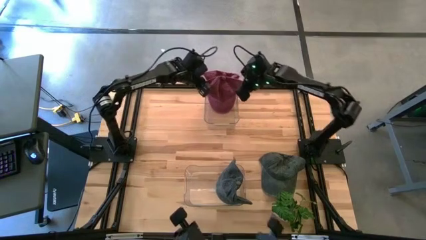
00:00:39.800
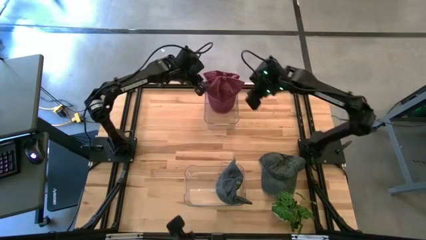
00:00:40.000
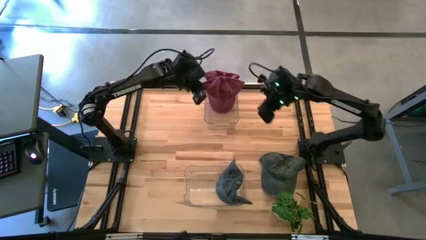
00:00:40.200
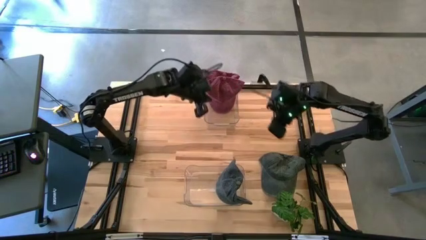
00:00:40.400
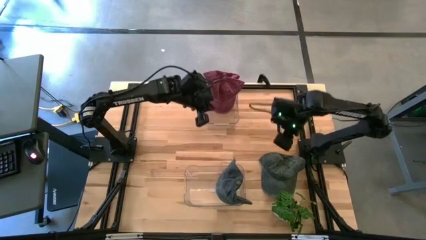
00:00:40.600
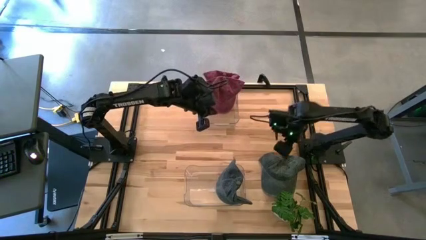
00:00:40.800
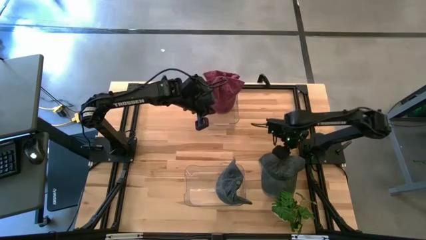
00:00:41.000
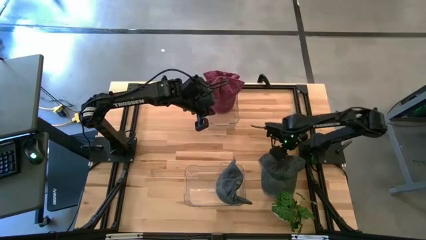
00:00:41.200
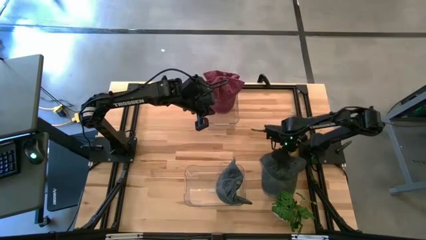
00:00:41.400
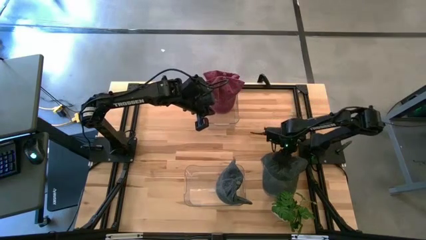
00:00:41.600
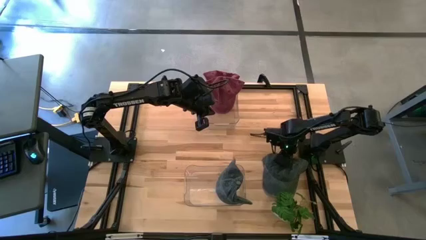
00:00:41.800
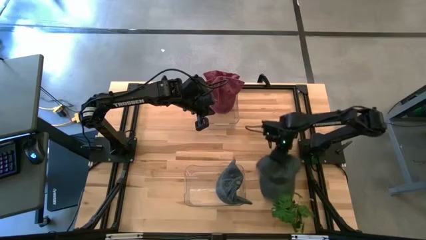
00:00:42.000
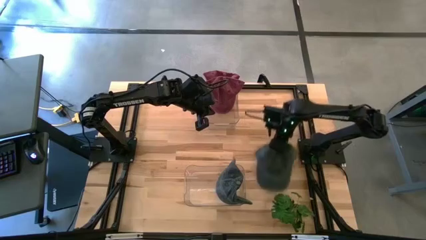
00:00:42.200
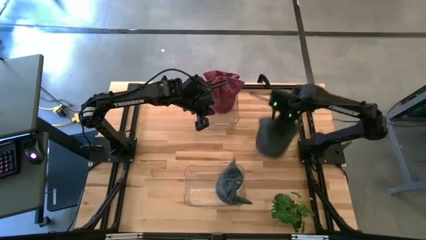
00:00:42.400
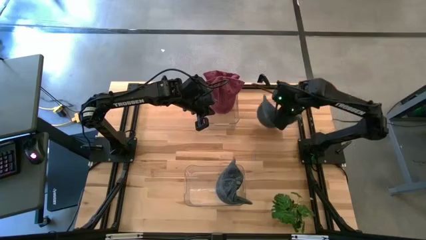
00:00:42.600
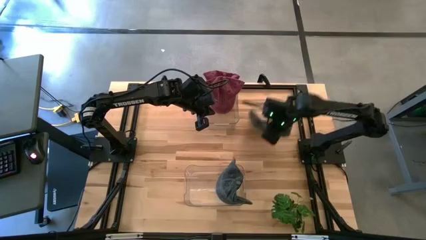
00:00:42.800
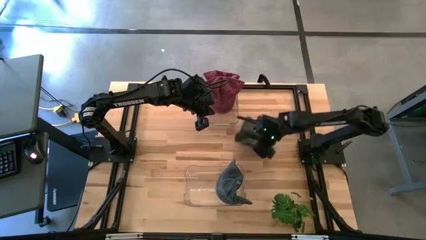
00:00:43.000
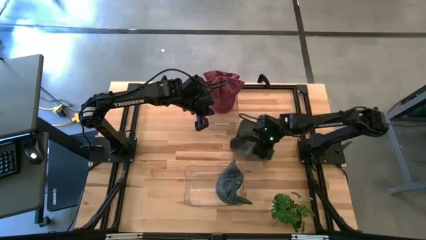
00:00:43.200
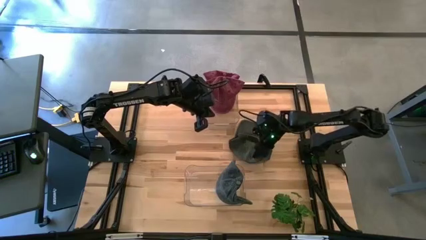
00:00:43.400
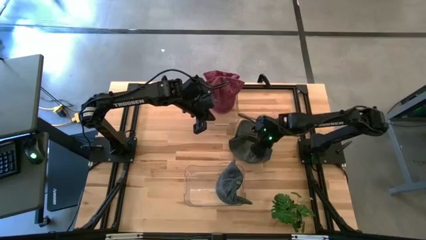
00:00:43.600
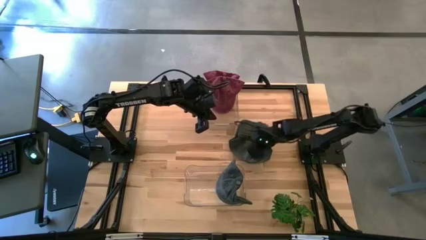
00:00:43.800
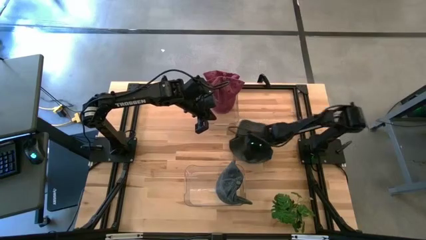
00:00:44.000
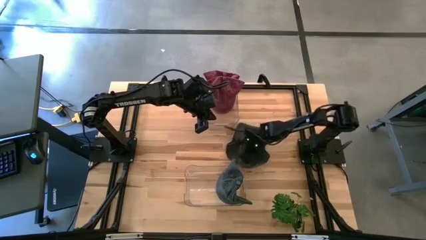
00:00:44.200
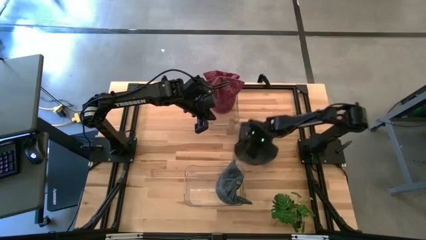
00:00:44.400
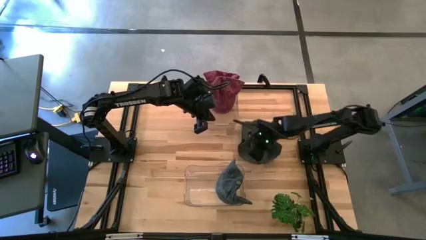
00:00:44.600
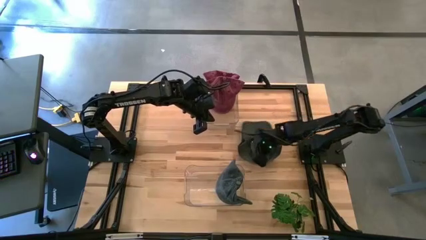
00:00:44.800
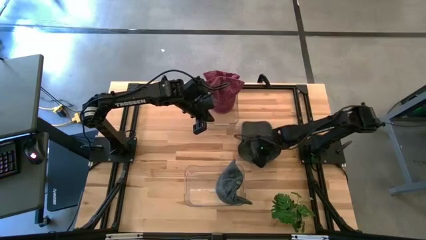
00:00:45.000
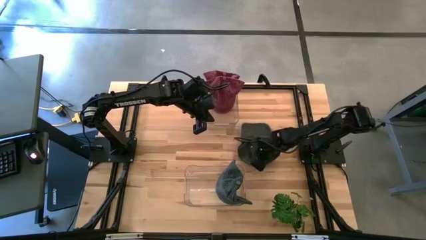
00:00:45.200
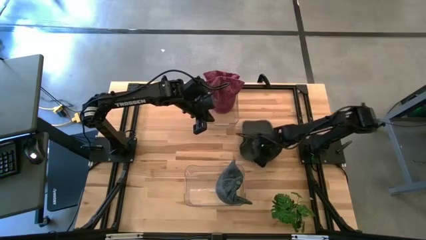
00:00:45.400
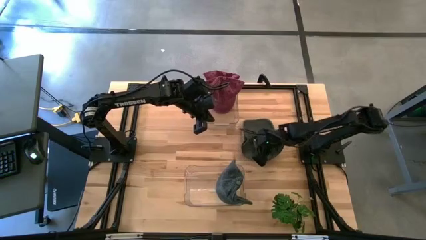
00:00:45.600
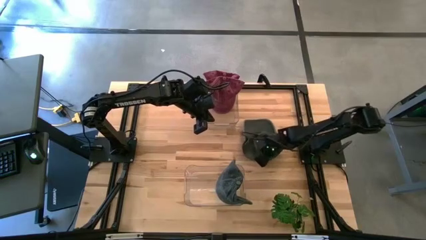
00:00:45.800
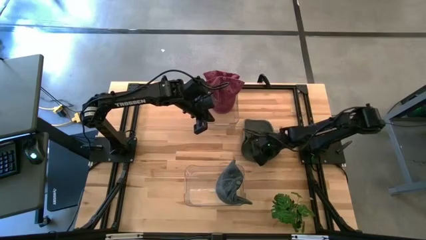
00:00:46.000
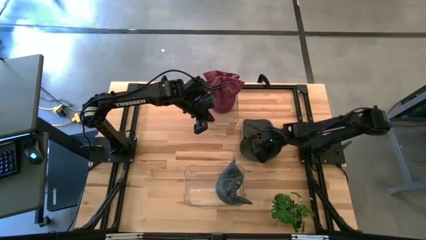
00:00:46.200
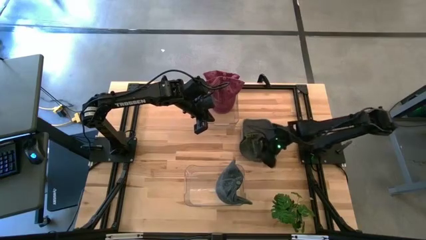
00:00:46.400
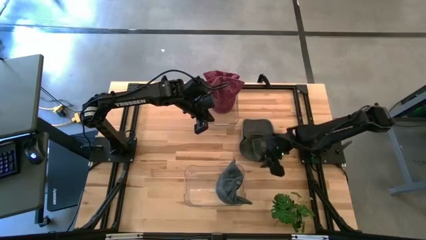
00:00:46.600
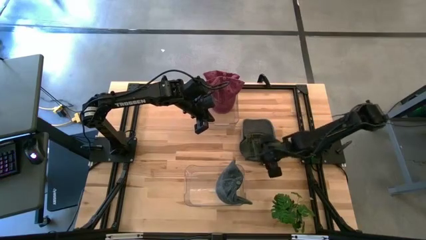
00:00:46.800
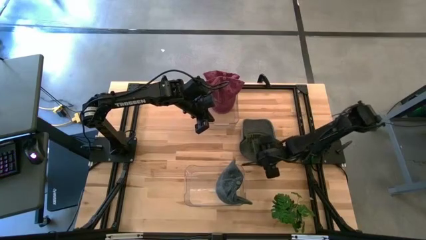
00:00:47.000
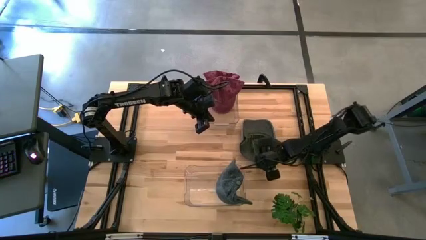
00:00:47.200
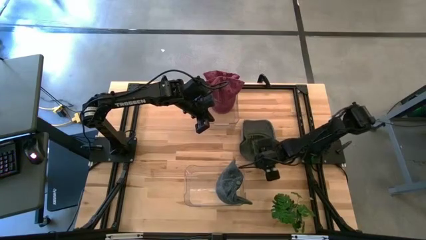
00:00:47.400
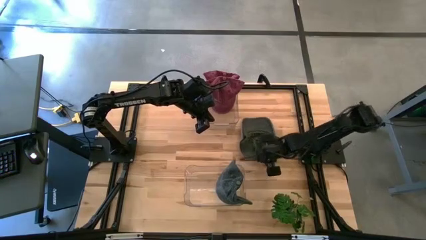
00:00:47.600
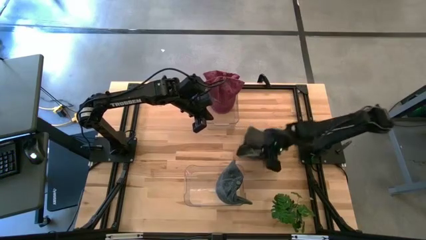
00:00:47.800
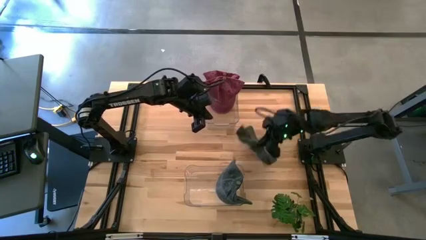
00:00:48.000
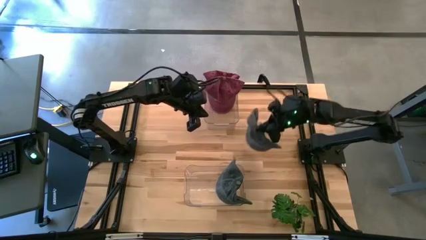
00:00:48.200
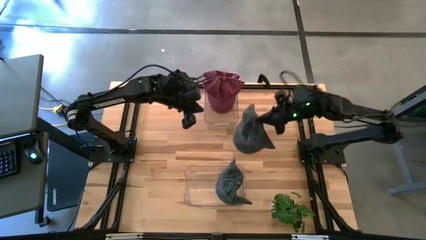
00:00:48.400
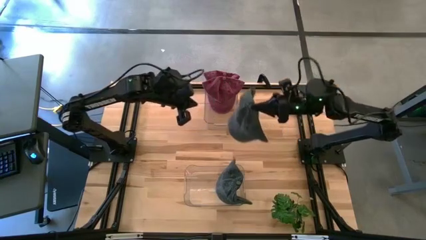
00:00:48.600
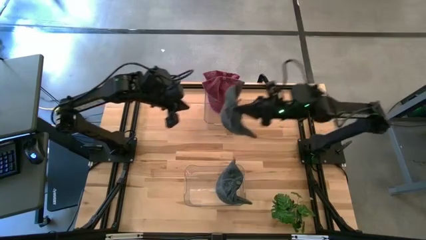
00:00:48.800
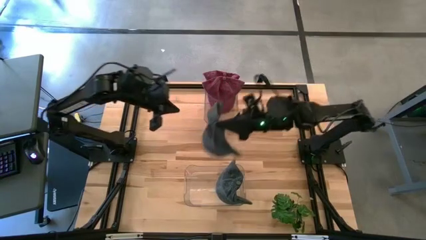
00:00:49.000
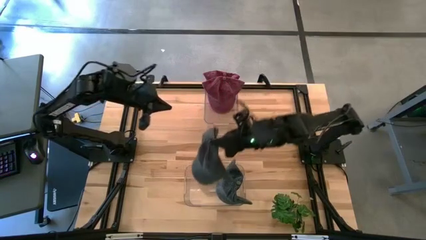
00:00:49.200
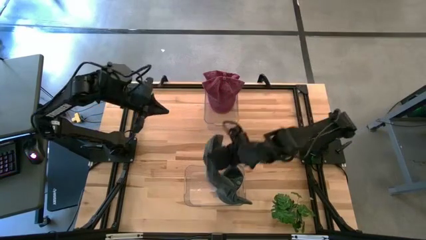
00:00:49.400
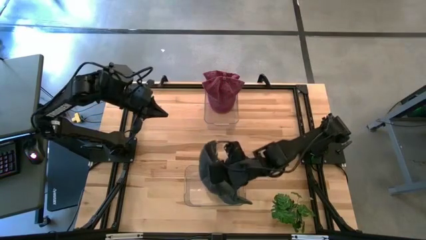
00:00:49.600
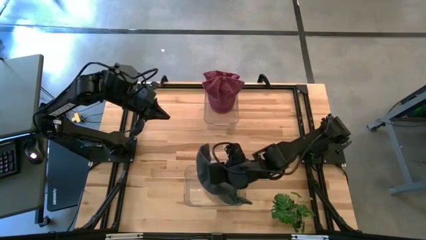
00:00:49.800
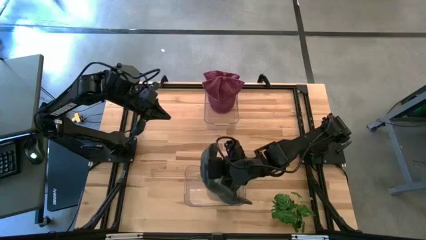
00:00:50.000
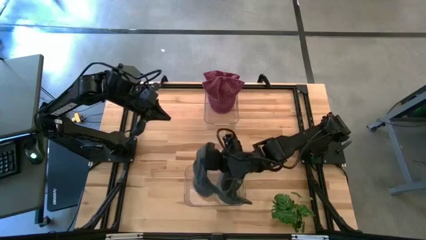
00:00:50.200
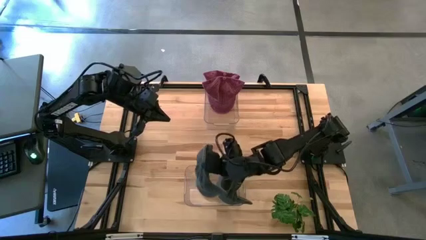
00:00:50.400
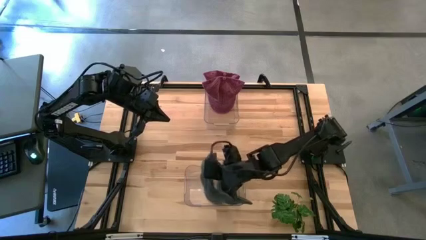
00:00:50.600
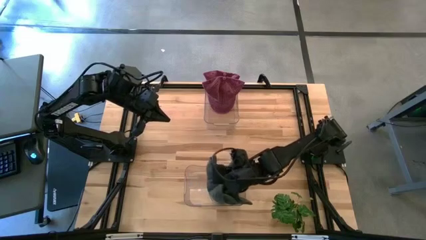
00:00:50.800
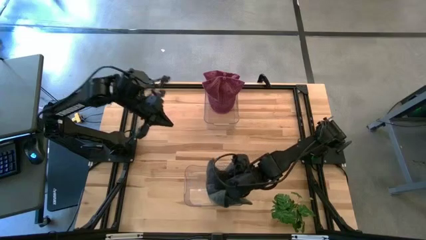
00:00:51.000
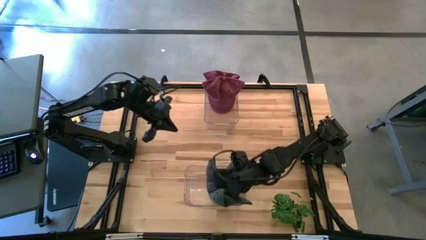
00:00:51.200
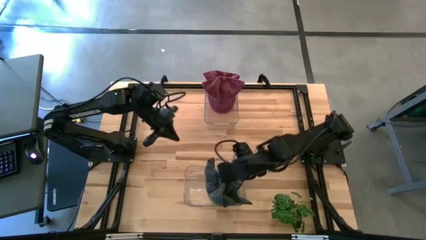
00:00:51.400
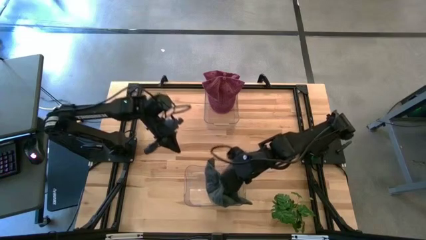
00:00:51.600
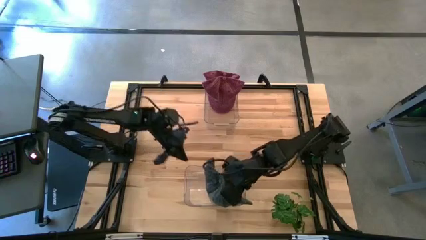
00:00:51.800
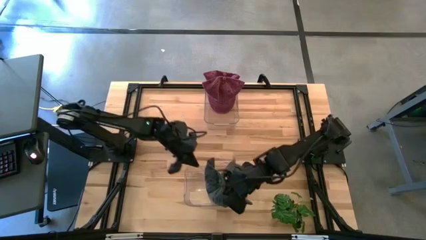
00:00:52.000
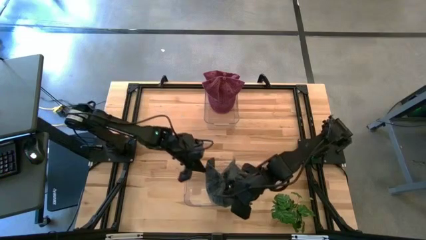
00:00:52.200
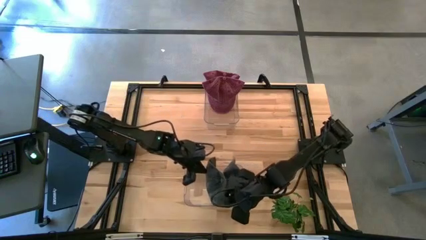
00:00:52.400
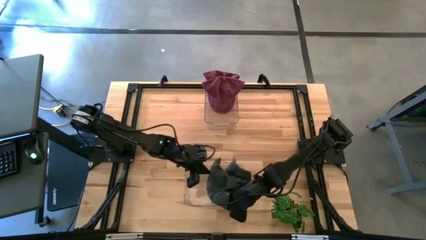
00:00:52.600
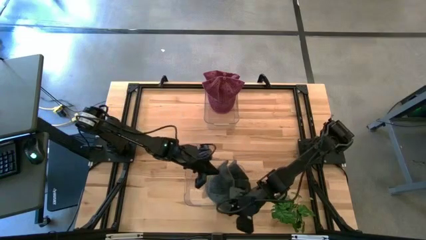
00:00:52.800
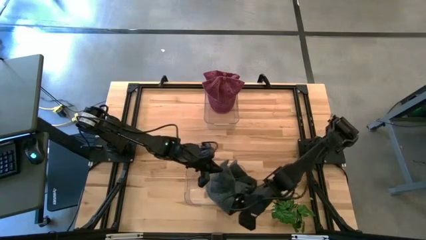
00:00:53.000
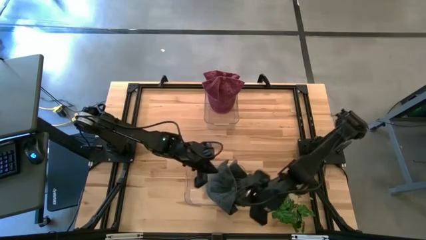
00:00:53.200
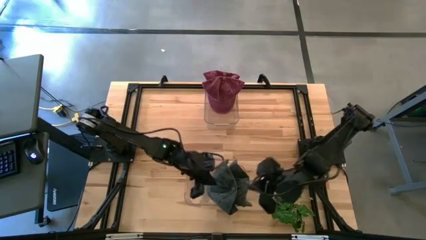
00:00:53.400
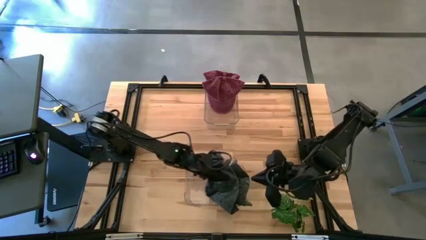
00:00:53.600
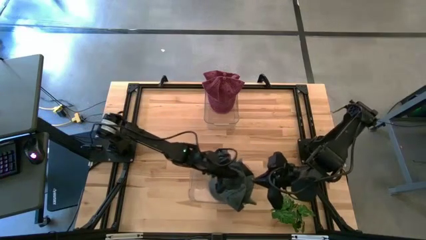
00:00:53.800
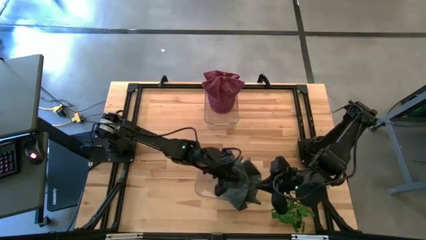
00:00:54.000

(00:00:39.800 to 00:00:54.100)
Task: Pick & Place hat
Put the black cap into the bottom transparent bin

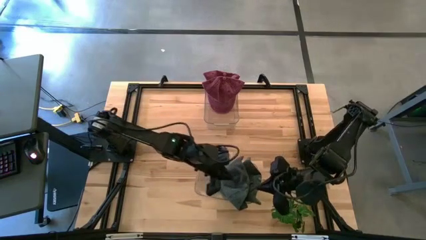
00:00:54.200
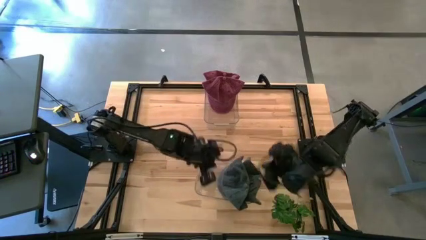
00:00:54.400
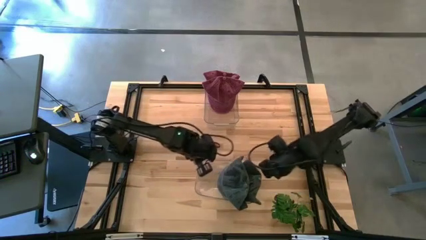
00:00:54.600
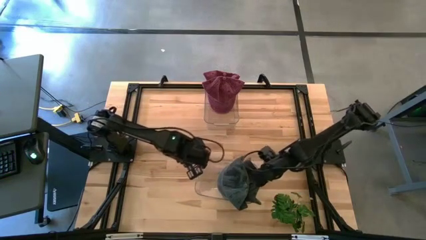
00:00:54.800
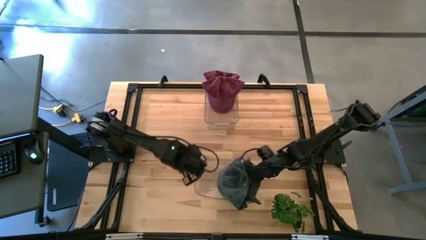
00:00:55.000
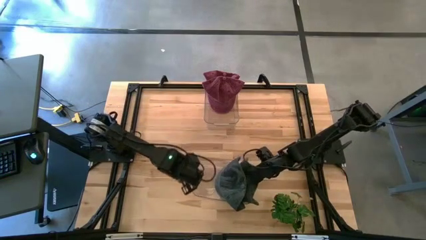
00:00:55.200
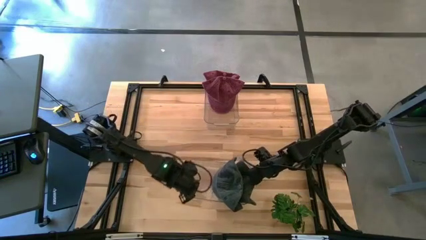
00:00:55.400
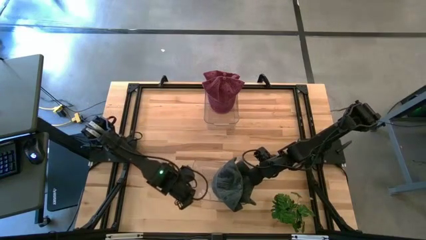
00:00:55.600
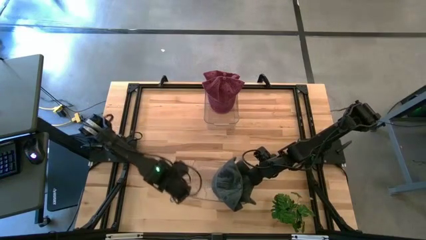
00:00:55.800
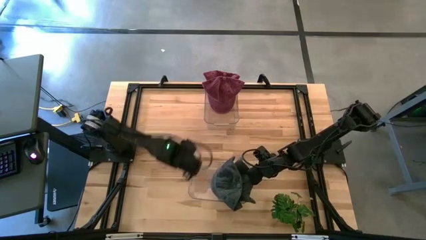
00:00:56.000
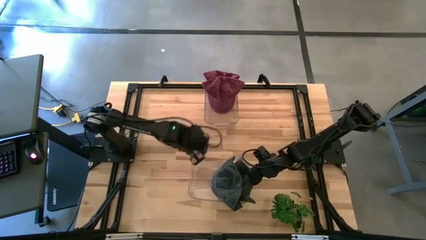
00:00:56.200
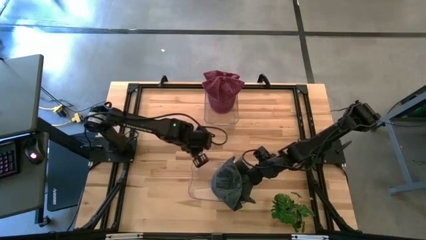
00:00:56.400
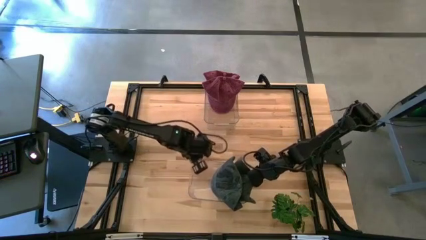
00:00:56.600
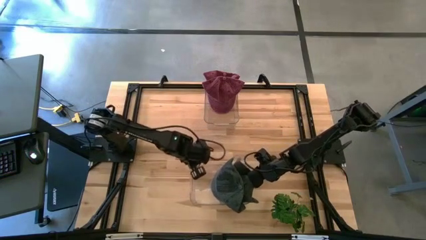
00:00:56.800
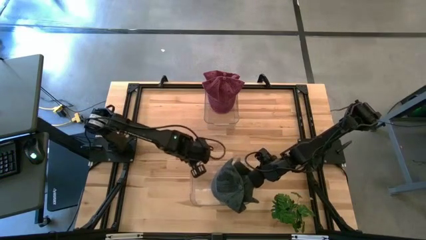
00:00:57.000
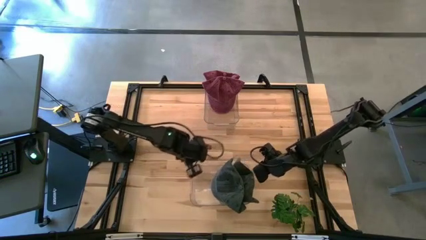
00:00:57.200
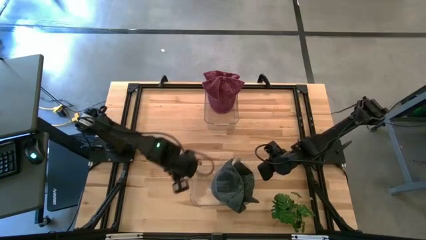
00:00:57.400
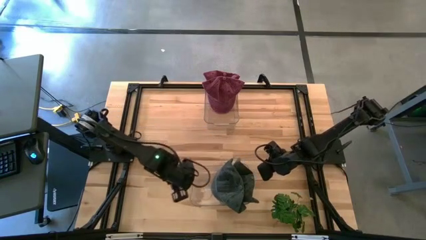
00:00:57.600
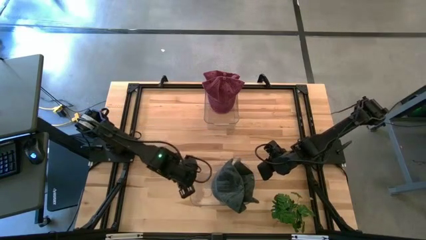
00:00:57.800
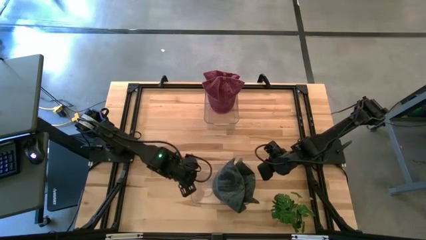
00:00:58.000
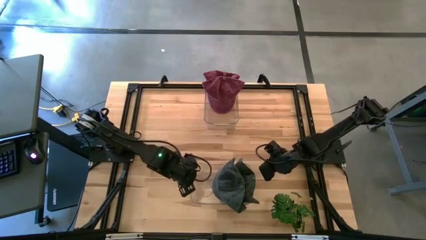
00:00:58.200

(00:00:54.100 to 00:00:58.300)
Adjust the bottom transparent bin
